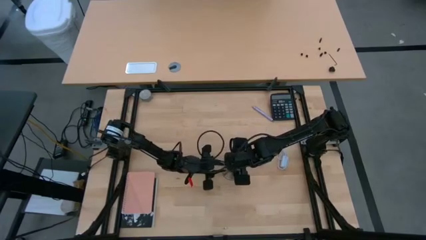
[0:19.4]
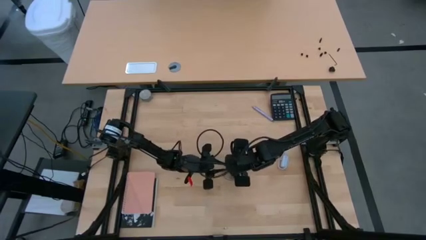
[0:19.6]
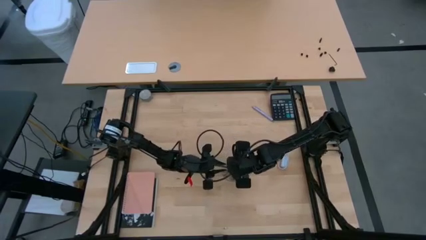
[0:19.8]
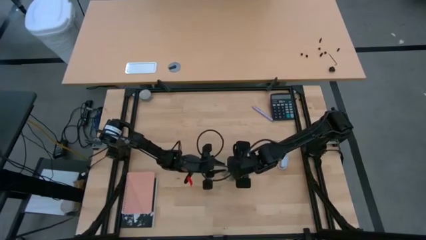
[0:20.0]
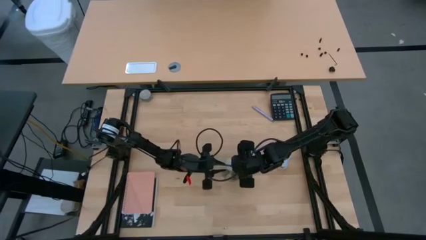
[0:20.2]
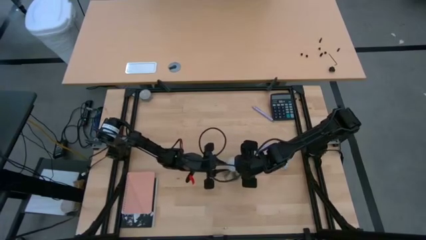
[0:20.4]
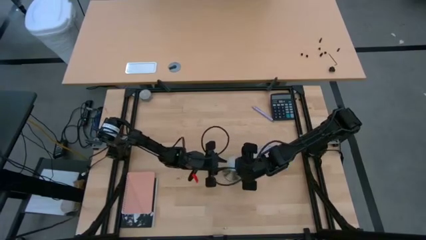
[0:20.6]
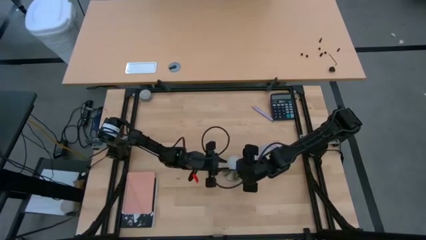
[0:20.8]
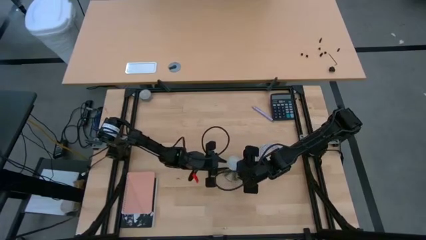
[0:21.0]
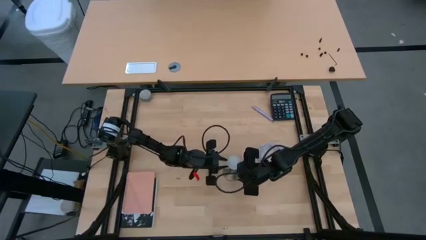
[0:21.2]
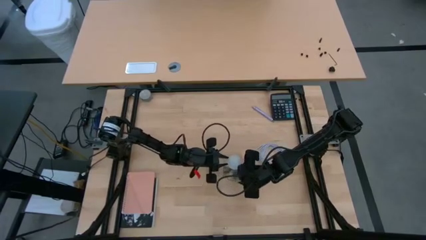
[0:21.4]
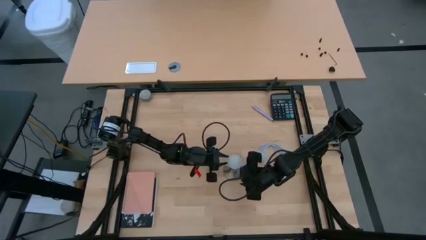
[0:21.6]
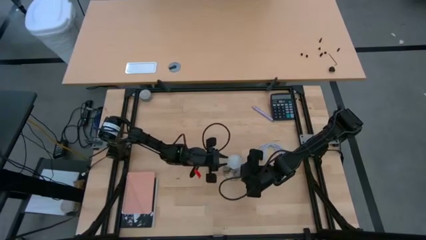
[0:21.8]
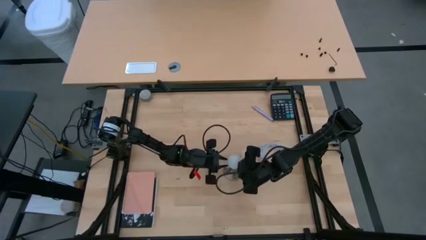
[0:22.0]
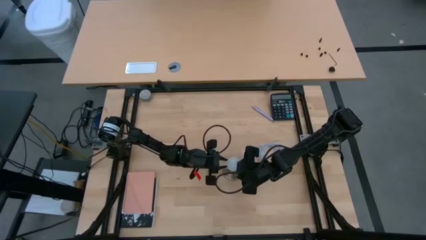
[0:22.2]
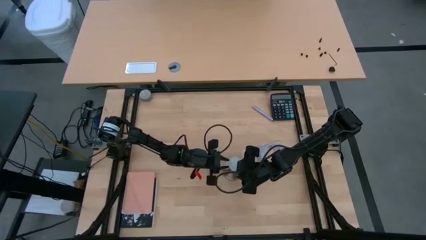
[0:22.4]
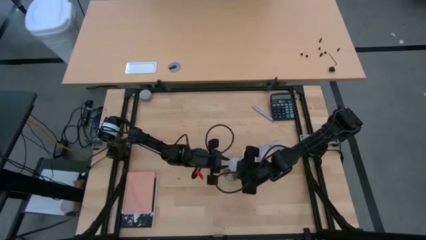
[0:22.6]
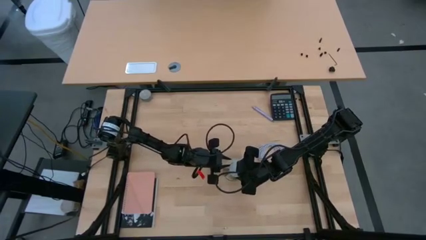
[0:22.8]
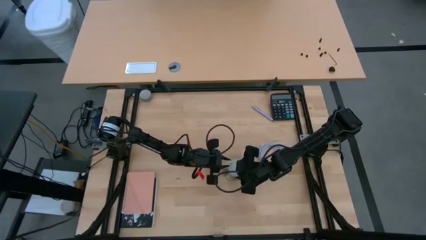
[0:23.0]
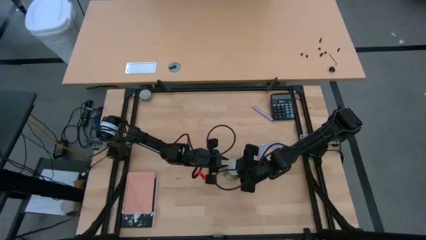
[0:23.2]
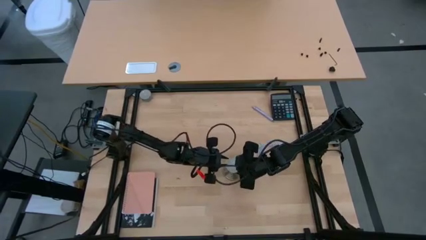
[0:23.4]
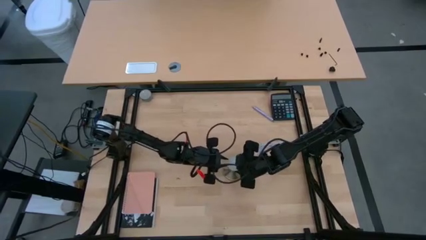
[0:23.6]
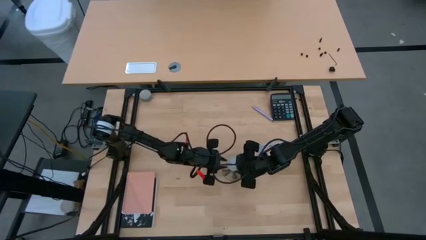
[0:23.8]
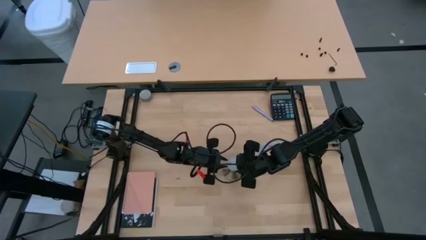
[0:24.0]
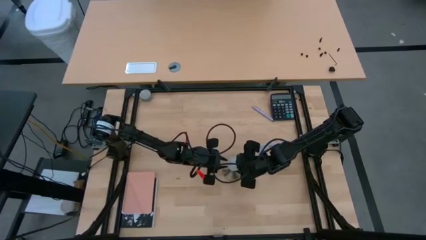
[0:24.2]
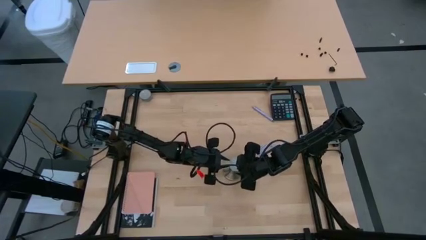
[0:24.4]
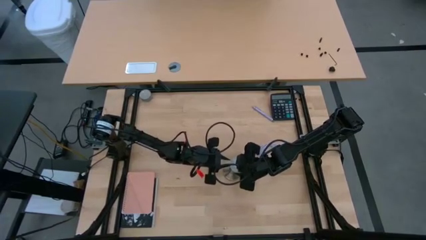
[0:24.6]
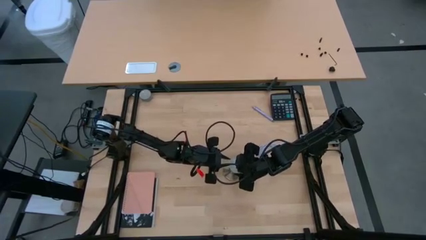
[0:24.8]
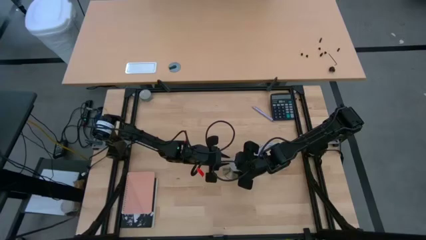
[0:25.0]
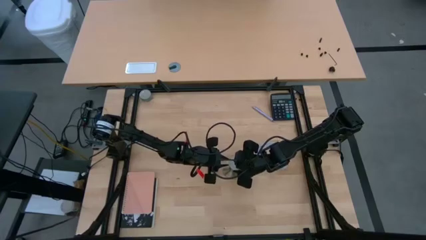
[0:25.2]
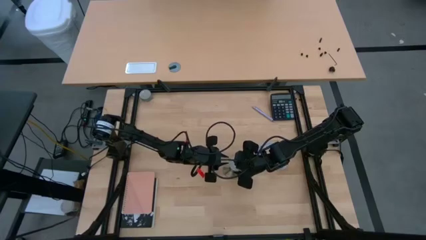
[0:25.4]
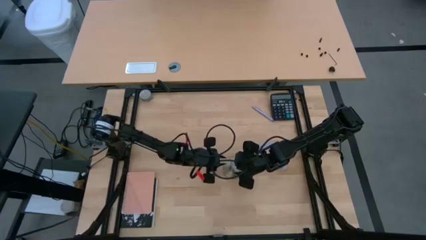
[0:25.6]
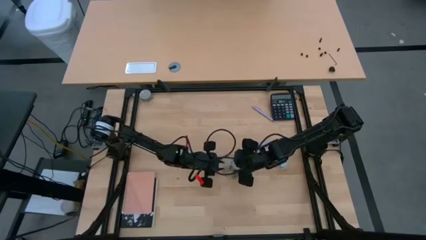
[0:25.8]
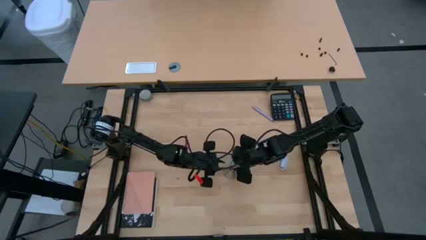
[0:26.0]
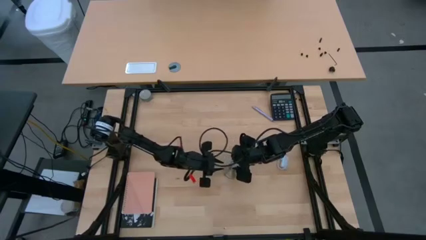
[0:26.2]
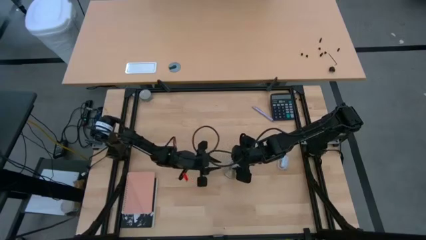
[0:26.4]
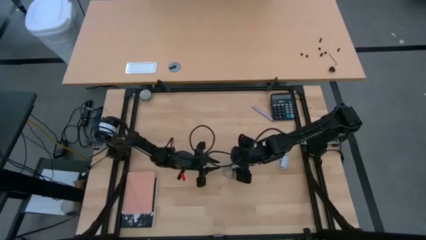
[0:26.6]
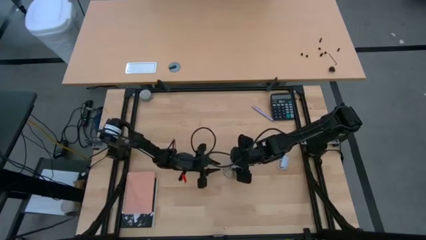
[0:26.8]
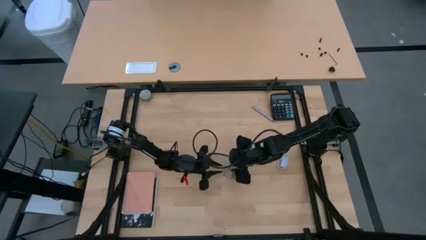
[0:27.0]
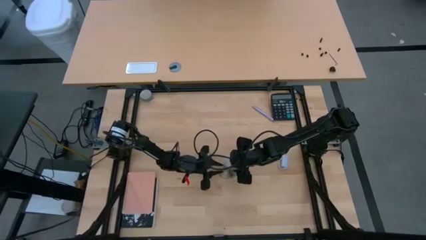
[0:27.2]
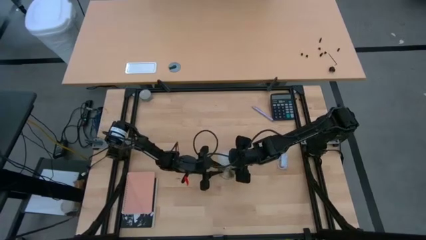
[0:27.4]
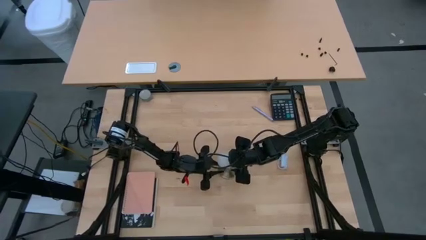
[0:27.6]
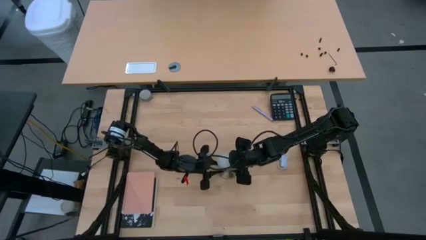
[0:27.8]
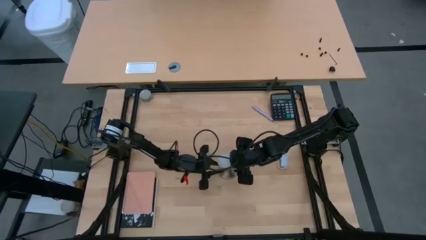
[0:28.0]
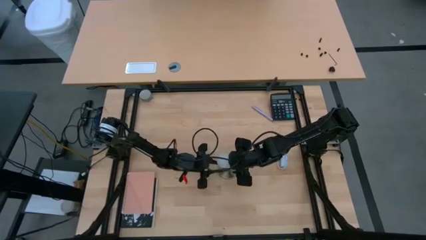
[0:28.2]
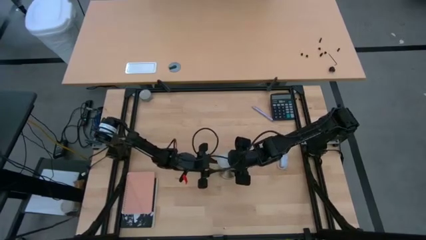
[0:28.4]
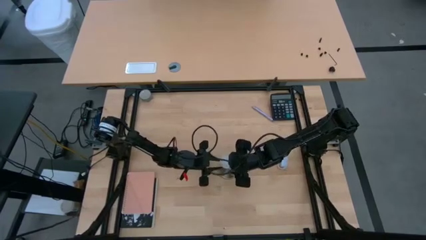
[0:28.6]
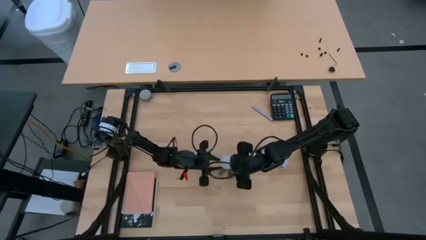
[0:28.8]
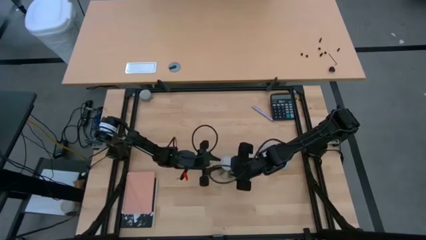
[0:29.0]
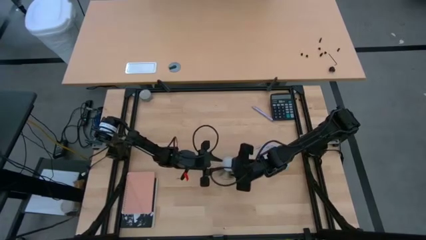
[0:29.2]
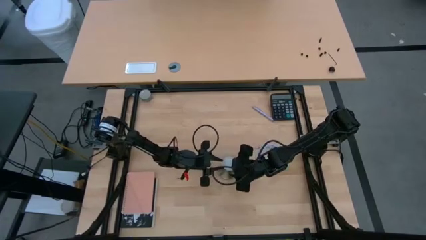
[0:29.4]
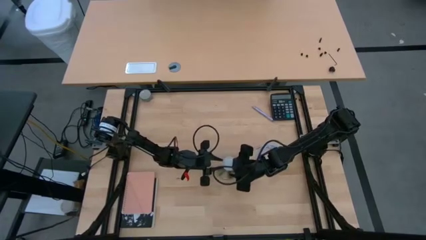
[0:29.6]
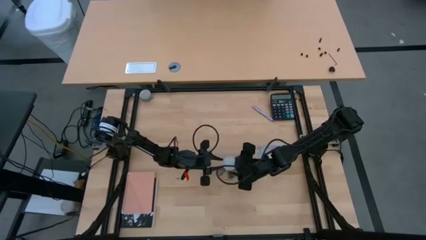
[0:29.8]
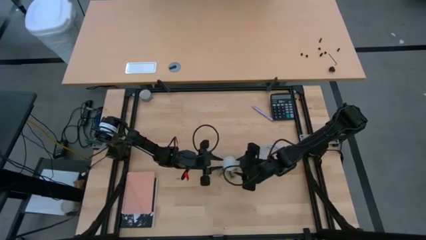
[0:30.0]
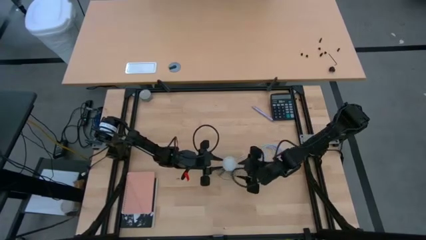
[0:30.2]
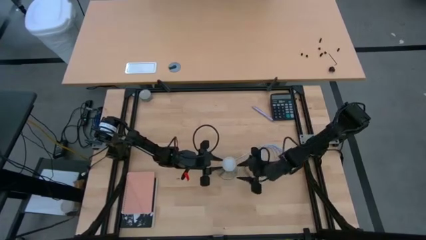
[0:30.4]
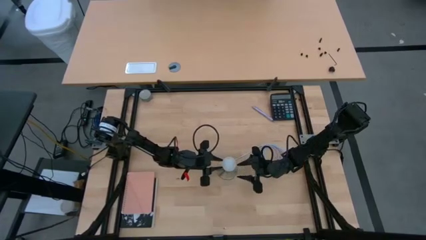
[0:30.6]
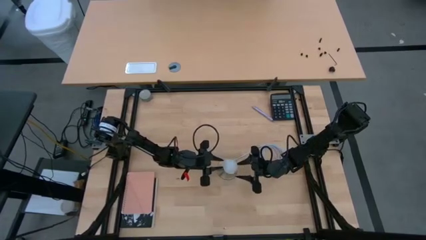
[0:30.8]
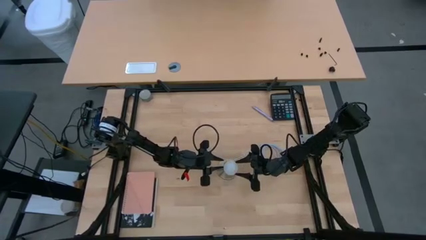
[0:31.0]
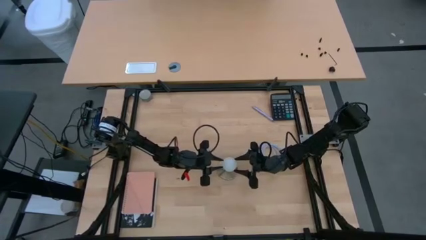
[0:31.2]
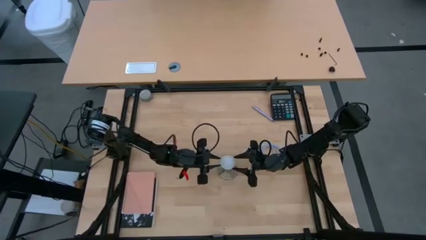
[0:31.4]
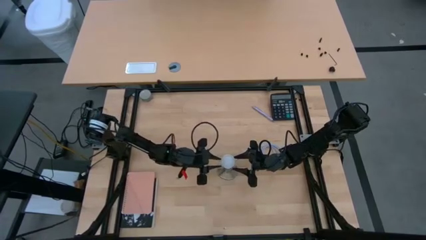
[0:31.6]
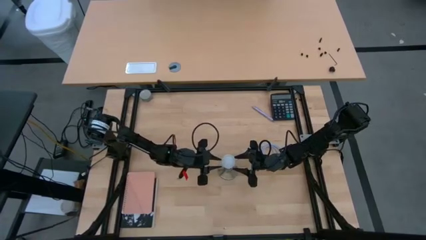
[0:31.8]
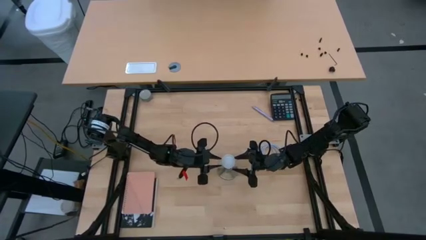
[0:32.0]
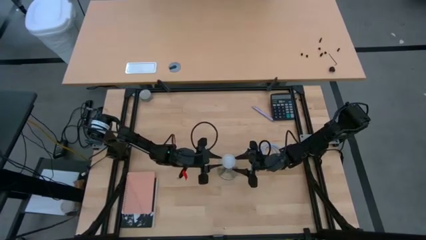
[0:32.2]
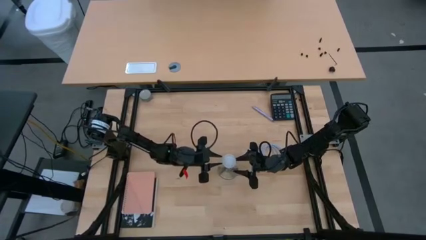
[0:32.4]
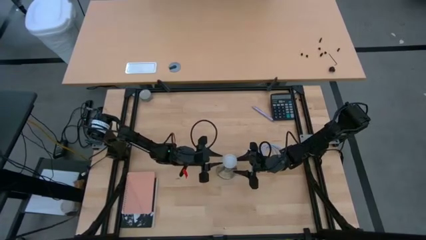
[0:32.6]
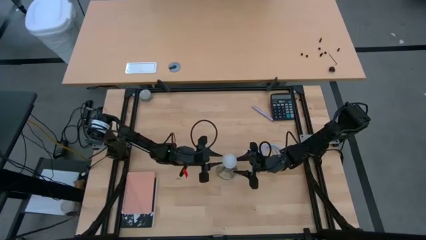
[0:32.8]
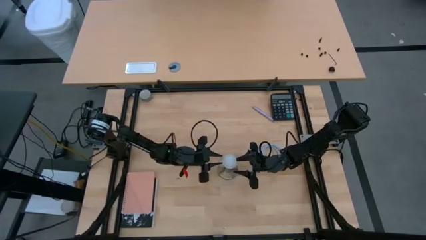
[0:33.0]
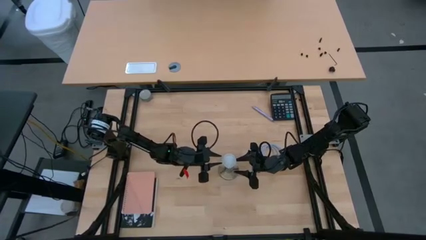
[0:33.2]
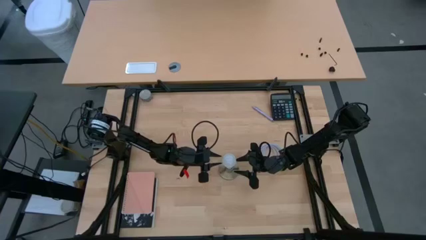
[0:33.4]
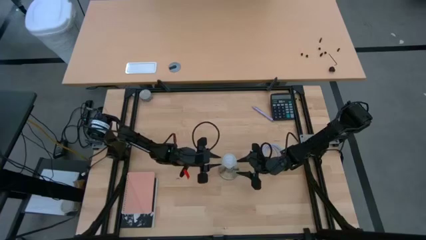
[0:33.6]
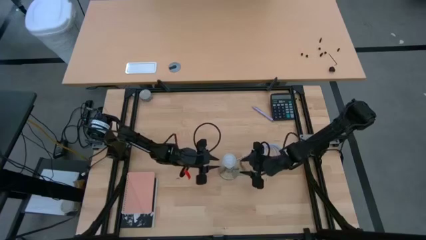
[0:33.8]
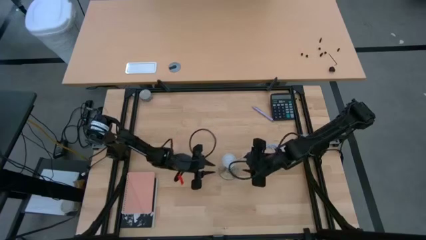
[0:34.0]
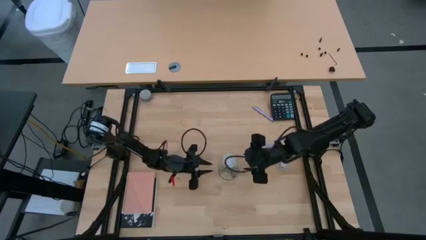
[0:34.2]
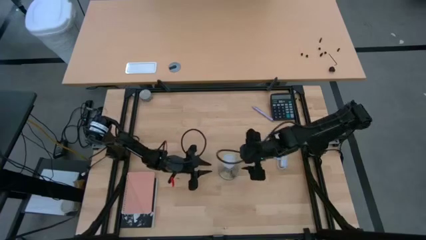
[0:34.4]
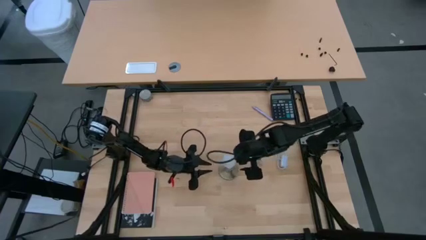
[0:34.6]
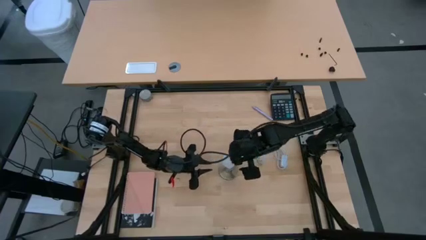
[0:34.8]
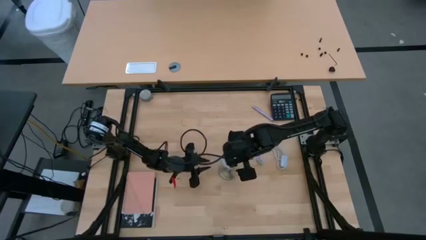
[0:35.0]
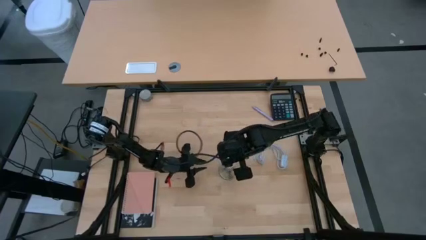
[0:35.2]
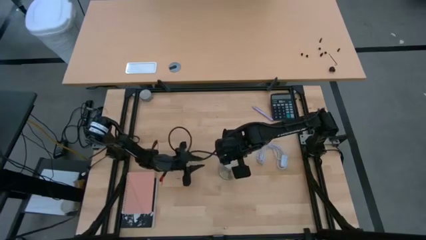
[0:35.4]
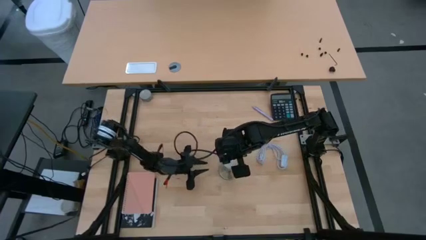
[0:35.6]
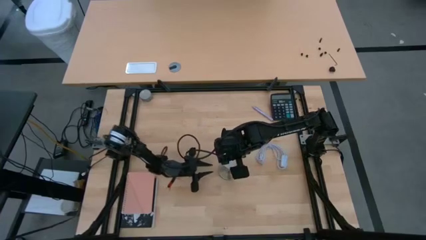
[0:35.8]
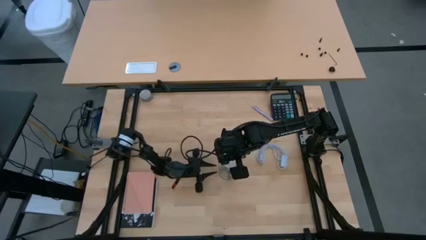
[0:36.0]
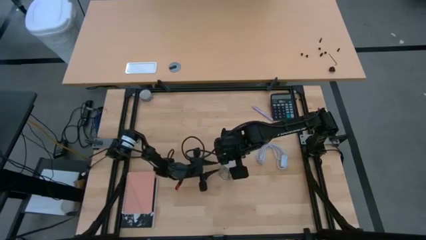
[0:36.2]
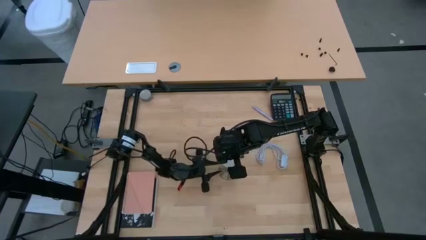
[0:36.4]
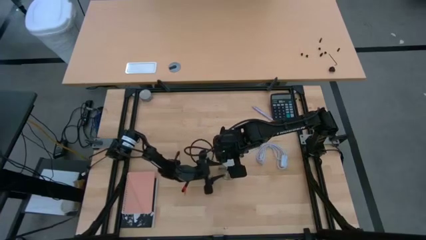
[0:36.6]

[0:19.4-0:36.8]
Task: Screw lightbulb
Insert the lightbulb on the lamp
